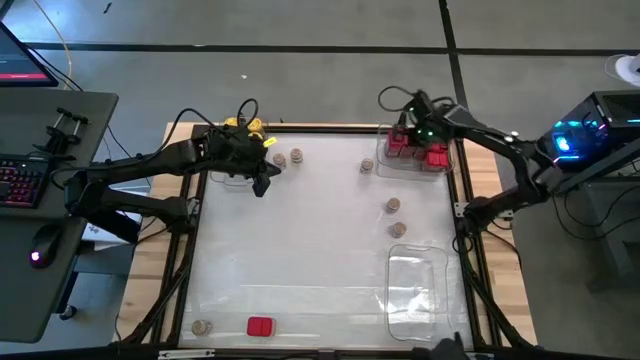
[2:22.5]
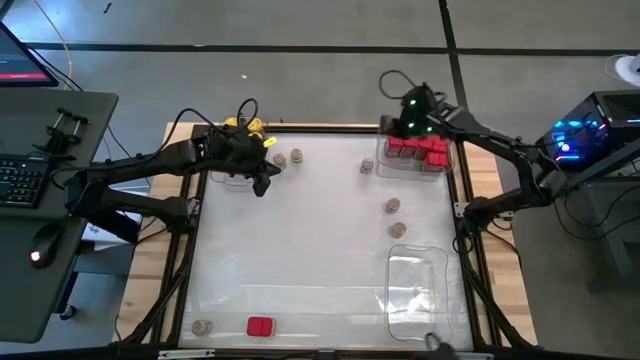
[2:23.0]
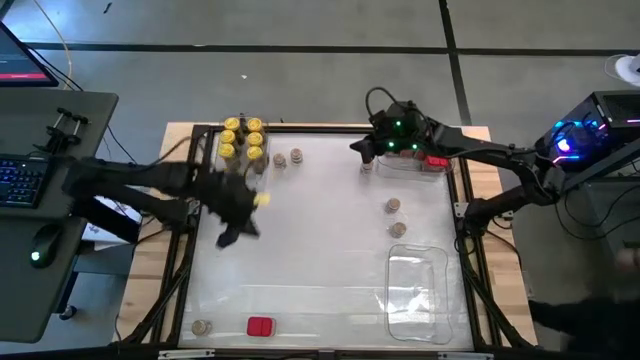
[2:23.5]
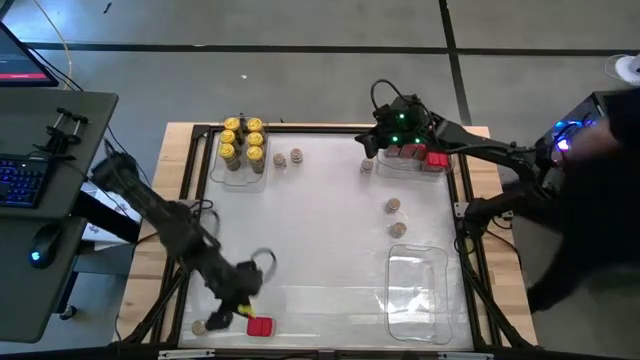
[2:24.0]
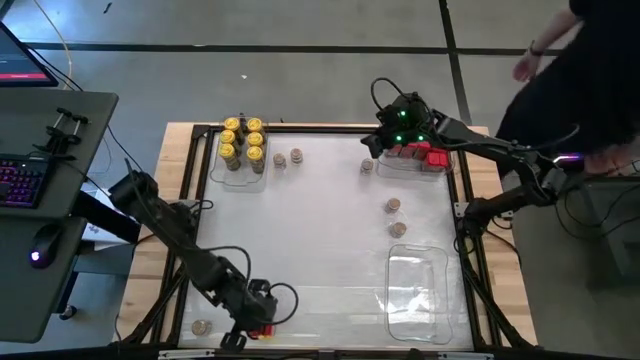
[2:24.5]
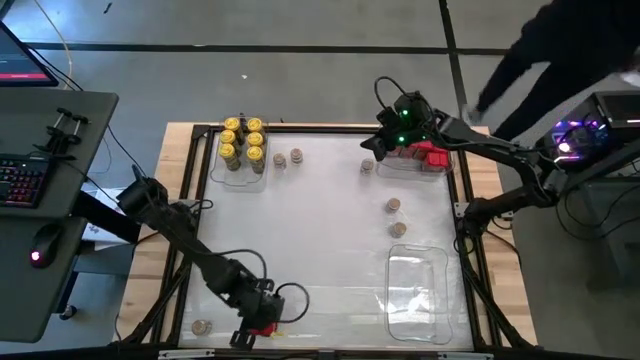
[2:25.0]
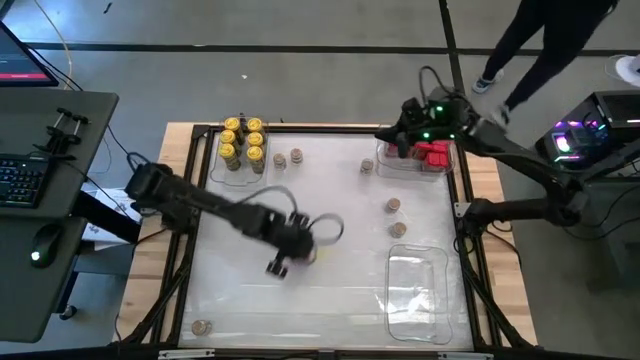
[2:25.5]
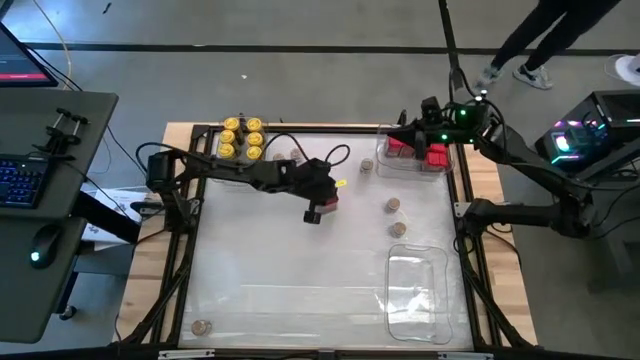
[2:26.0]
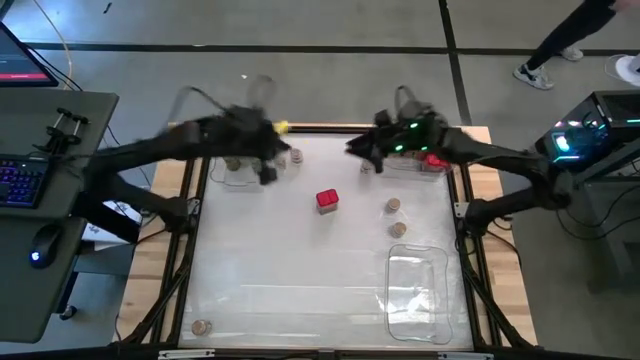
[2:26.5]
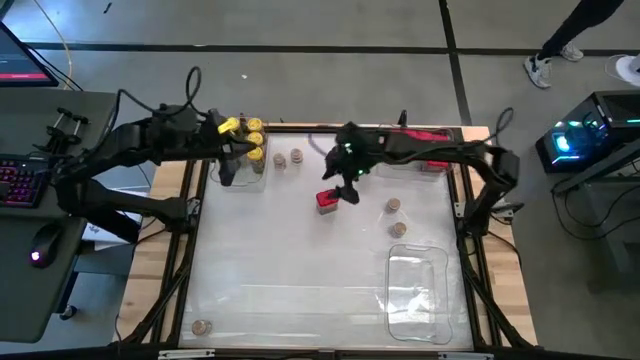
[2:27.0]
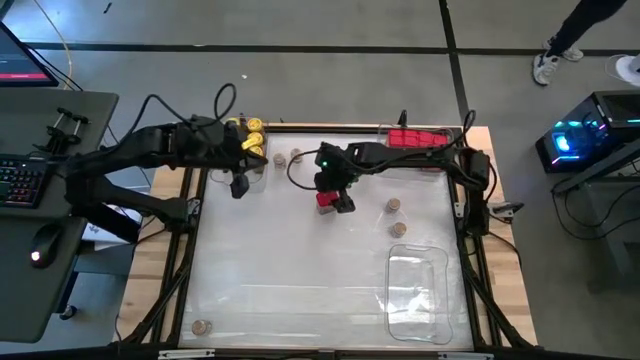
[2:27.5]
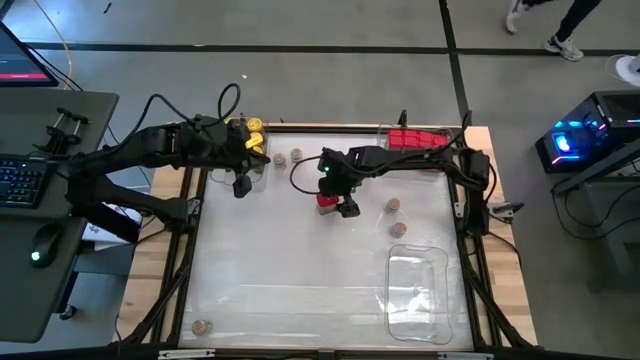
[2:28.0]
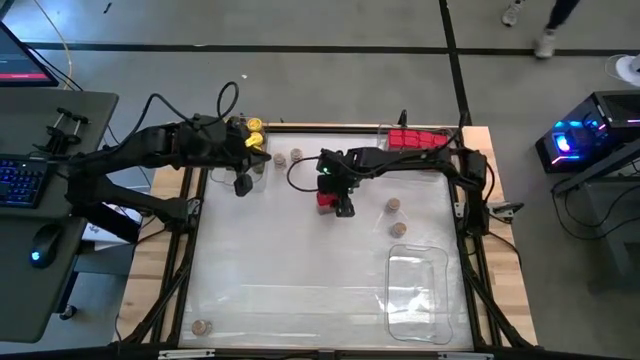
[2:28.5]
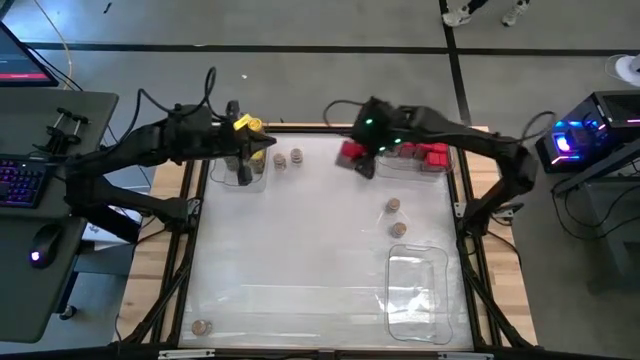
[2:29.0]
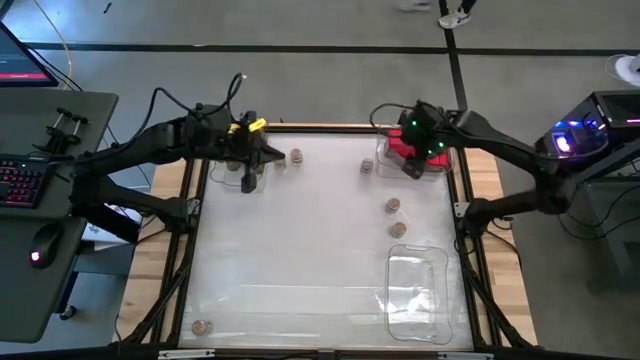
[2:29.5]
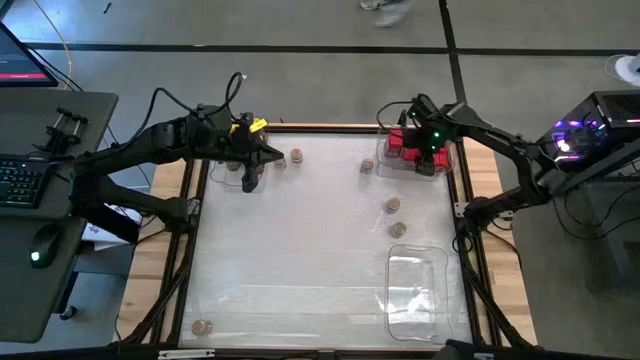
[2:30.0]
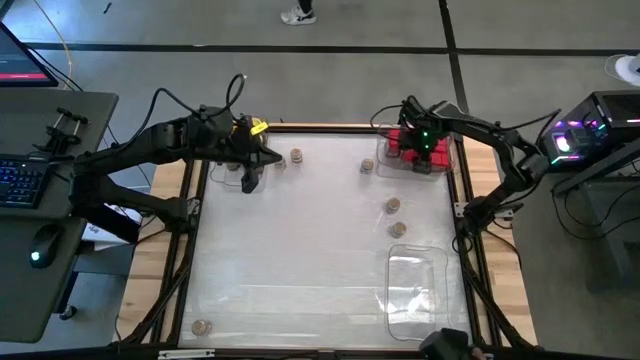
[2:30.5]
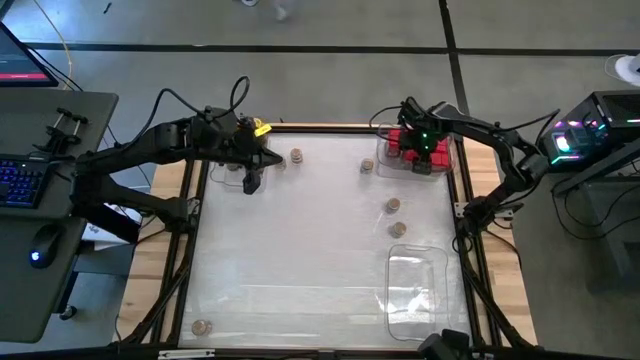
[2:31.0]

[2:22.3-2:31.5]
Task: Sort spices by type
Put the red seasoning can into the top right transparent bin

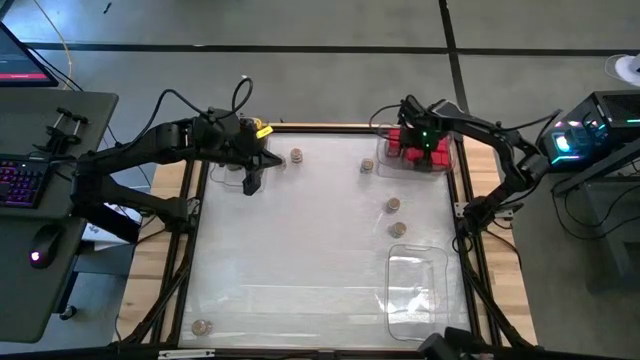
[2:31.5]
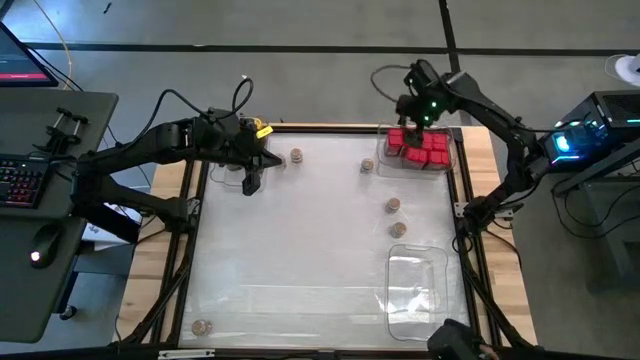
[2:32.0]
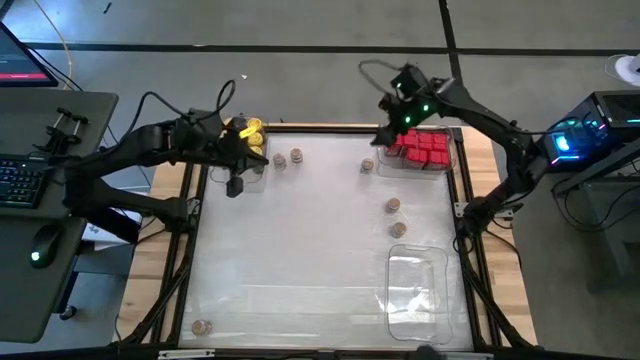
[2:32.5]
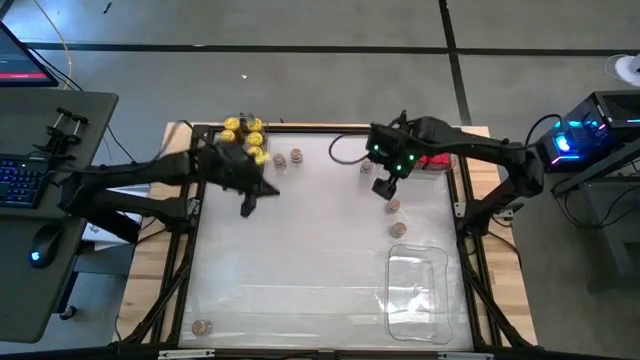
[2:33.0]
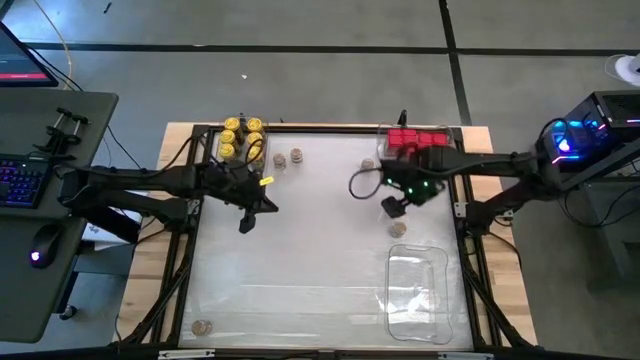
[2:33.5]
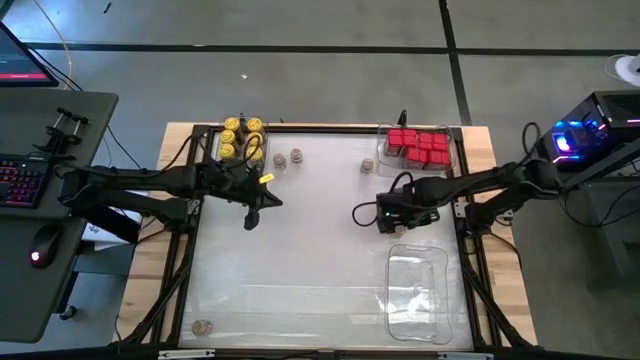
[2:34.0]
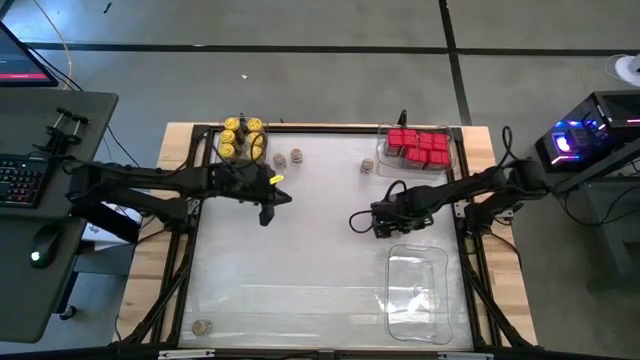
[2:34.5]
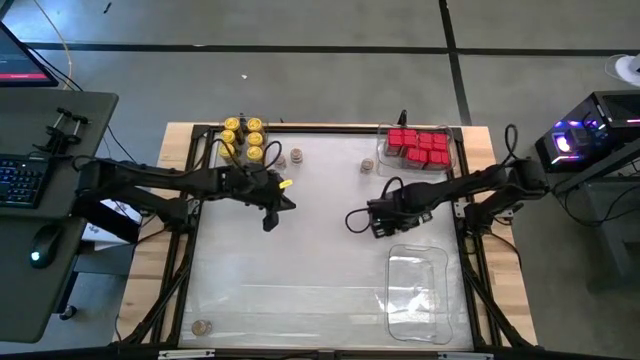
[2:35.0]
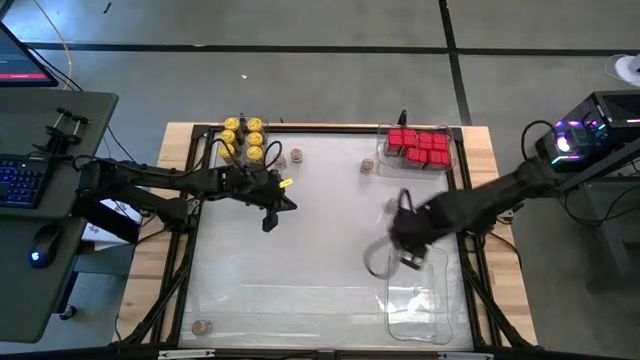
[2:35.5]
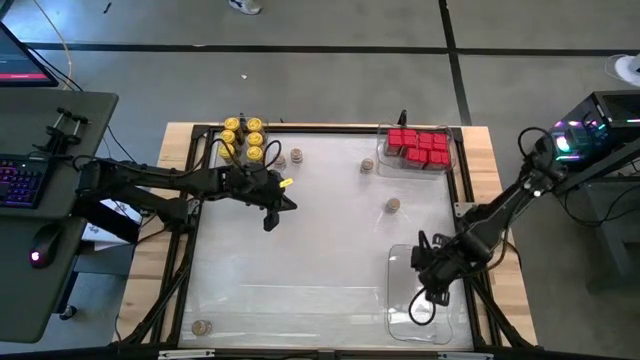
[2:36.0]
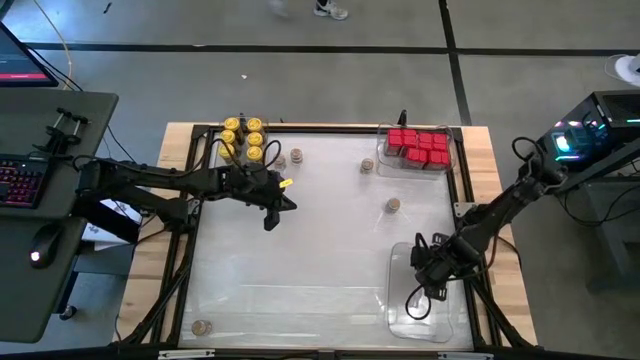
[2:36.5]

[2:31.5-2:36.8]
Put the brown seasoning bottle into the bottom right transparent bin

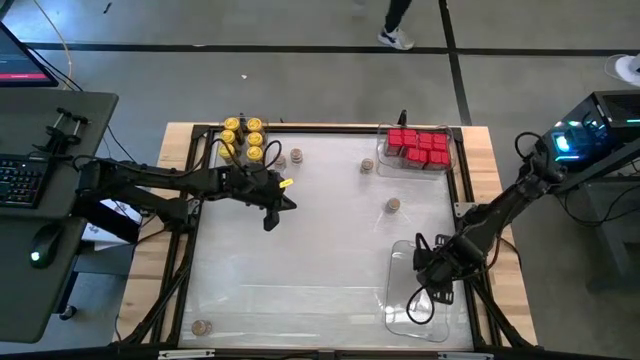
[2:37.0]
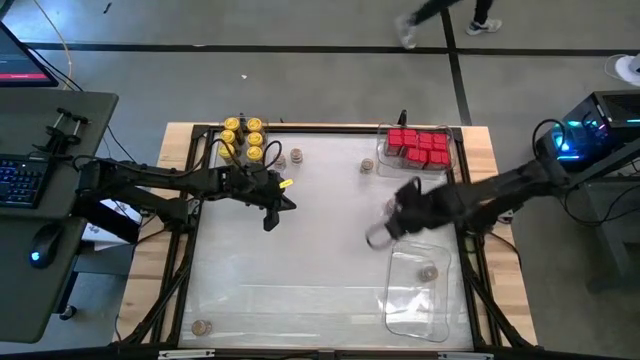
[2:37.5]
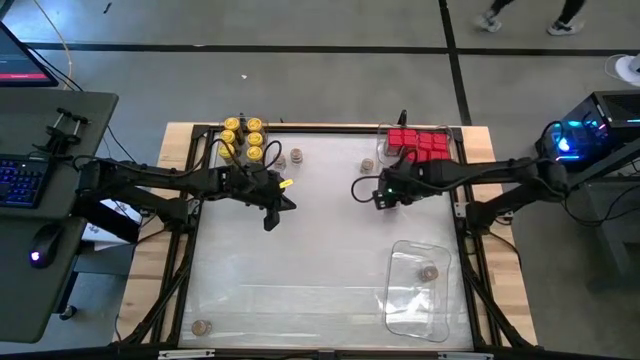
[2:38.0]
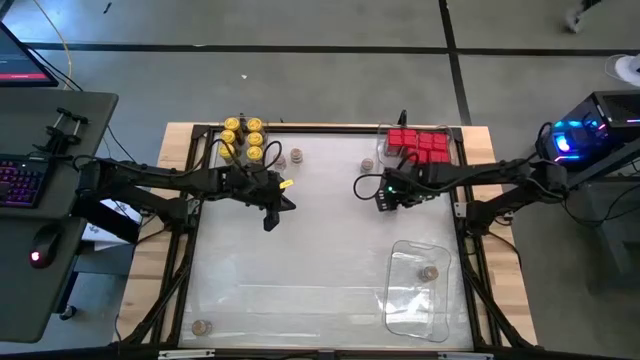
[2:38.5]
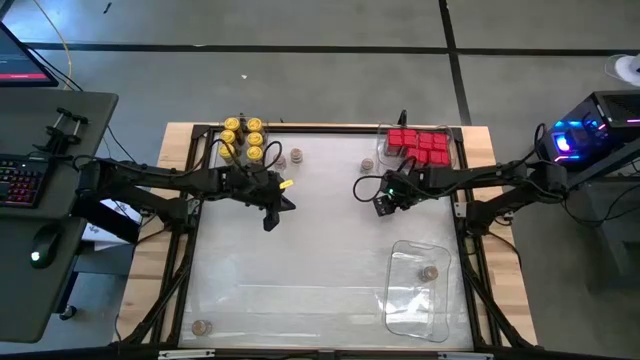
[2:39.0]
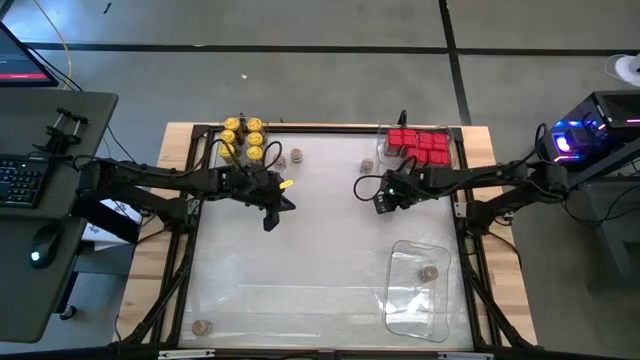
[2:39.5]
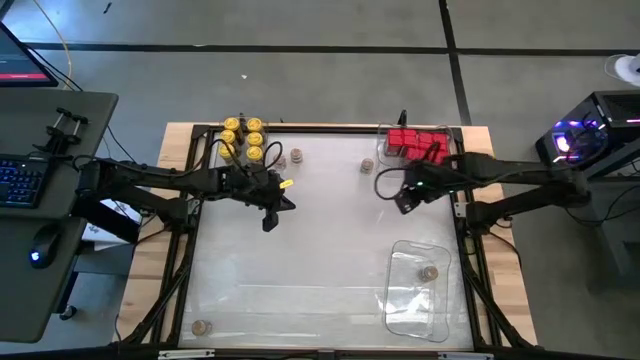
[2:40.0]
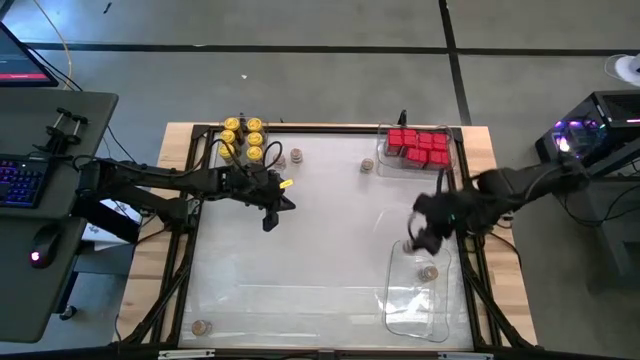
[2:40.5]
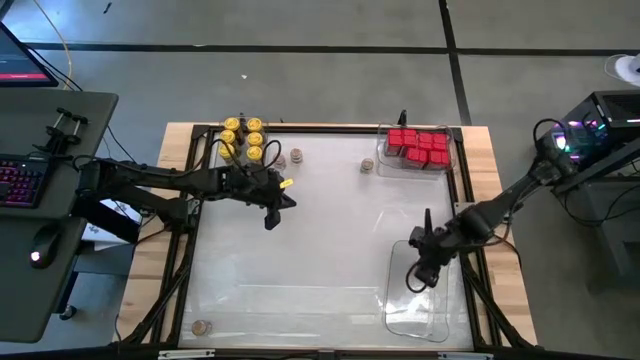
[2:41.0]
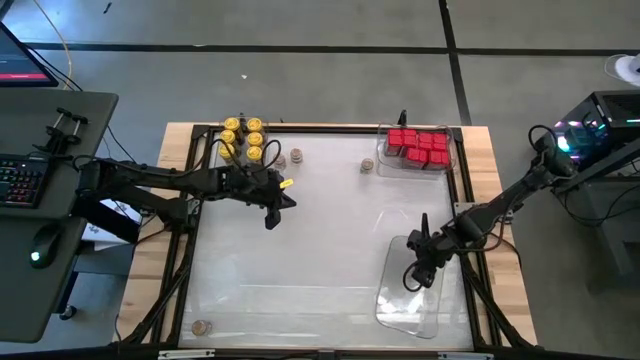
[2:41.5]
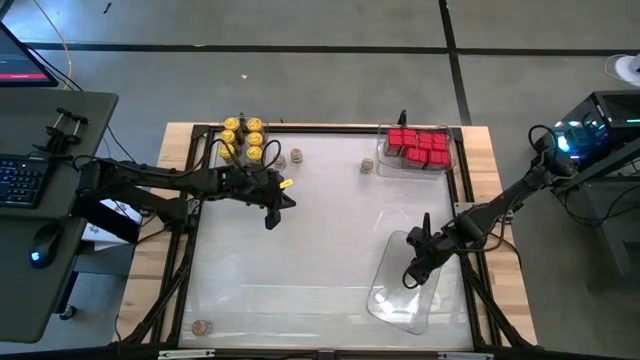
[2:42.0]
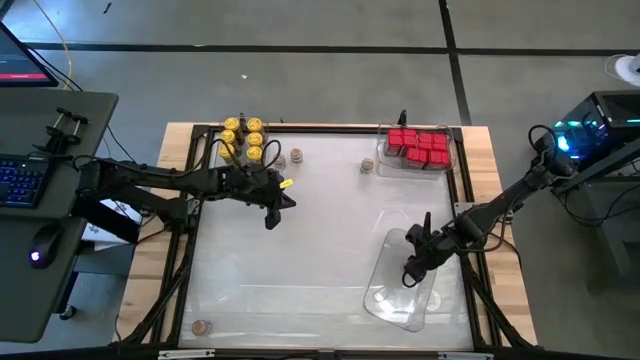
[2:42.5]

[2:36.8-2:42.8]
Put the brown seasoning bottle into the bottom right transparent bin
